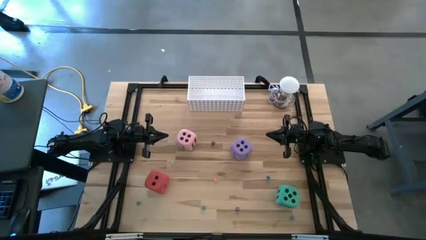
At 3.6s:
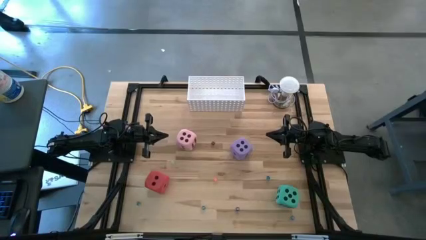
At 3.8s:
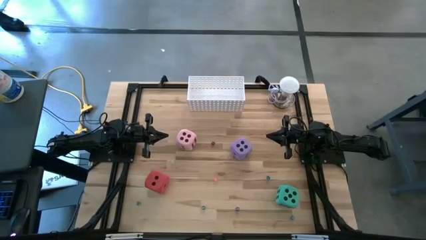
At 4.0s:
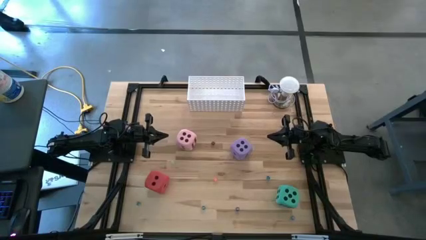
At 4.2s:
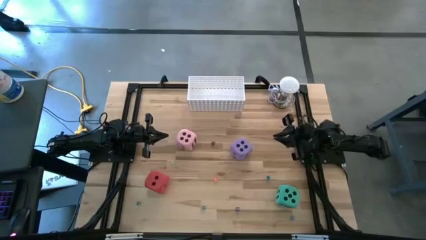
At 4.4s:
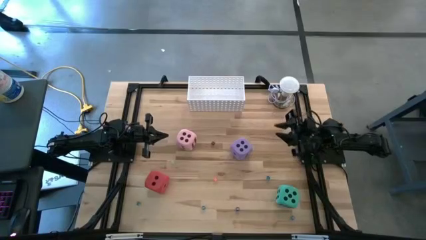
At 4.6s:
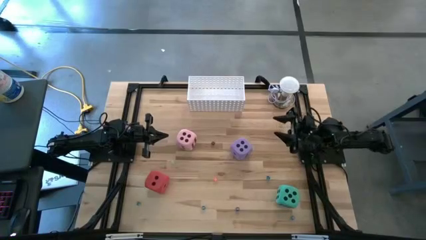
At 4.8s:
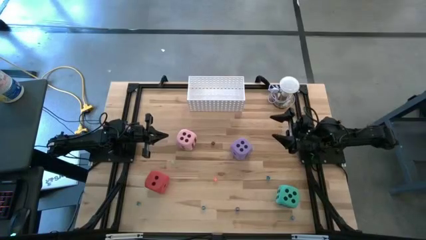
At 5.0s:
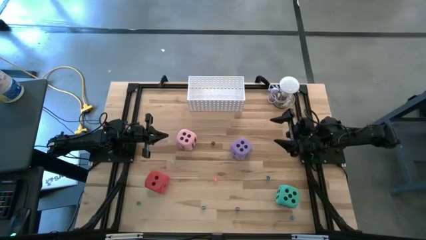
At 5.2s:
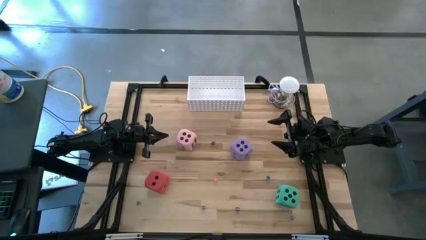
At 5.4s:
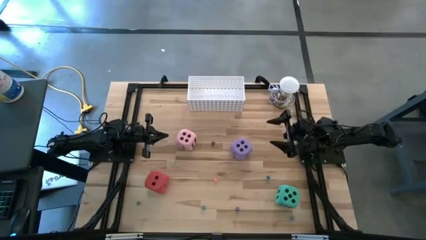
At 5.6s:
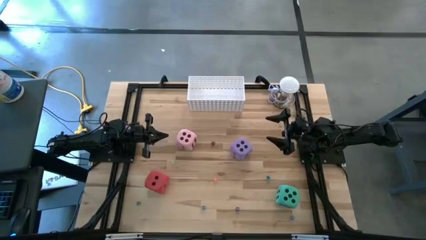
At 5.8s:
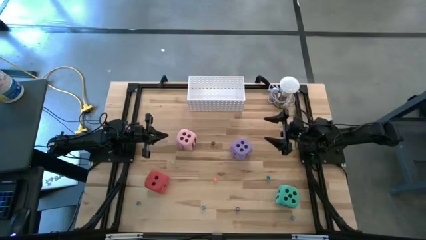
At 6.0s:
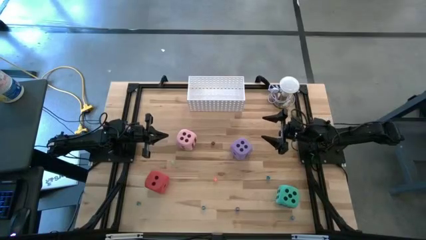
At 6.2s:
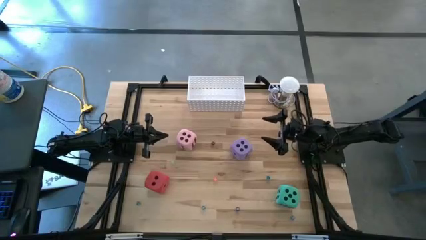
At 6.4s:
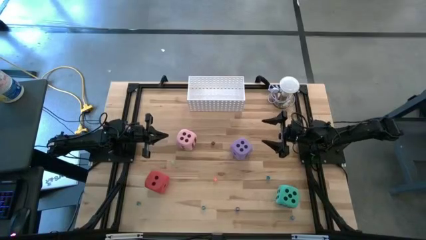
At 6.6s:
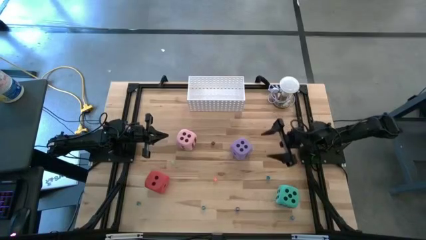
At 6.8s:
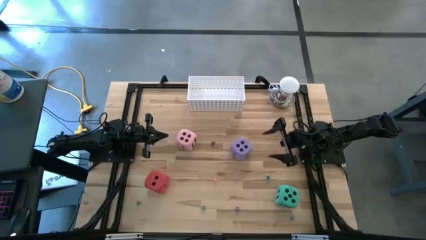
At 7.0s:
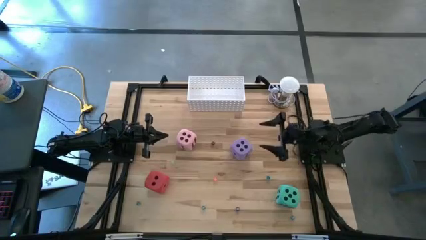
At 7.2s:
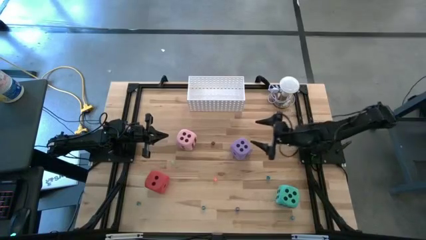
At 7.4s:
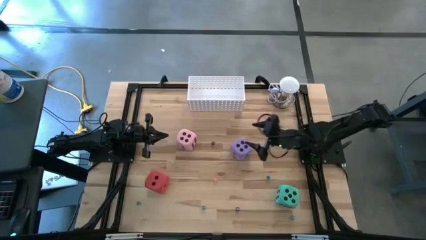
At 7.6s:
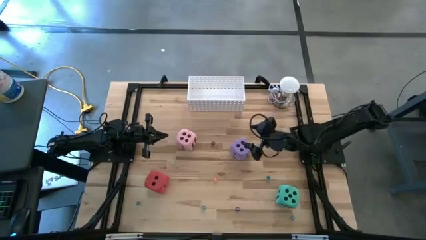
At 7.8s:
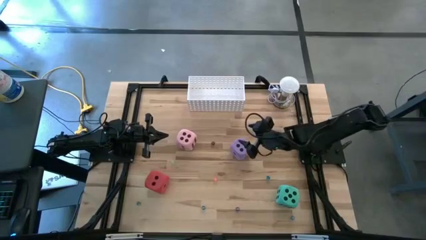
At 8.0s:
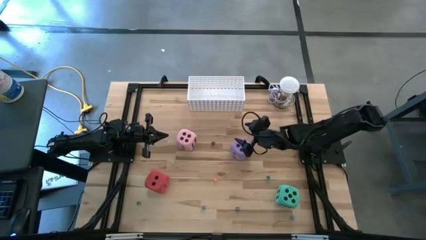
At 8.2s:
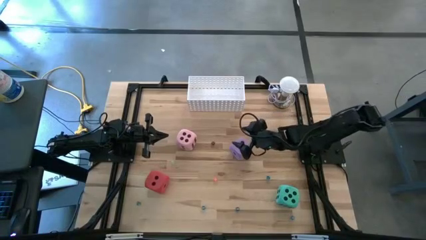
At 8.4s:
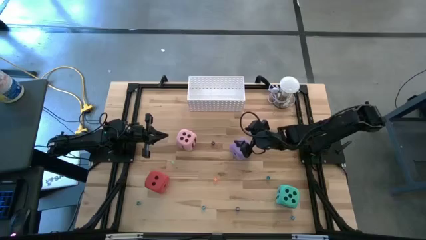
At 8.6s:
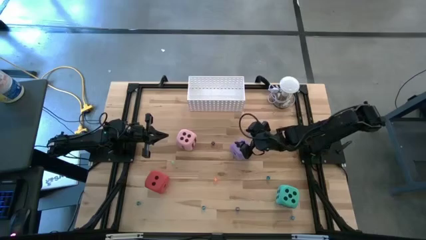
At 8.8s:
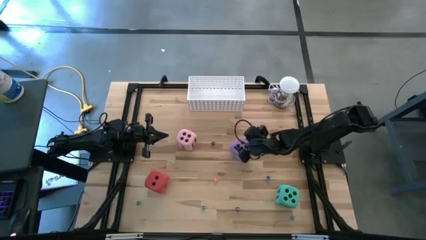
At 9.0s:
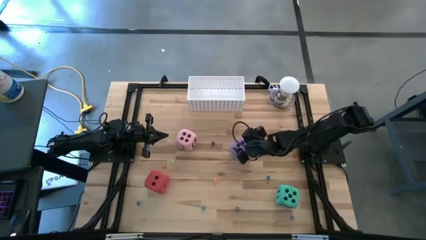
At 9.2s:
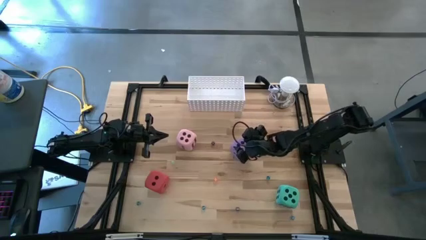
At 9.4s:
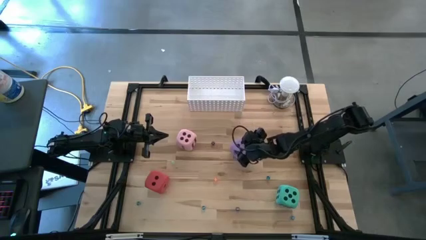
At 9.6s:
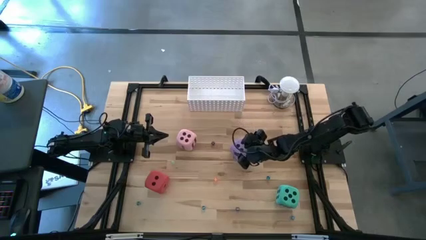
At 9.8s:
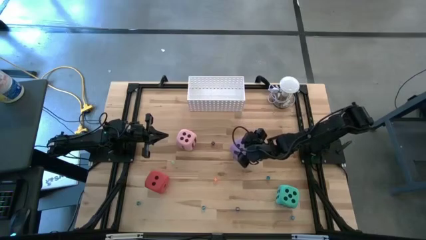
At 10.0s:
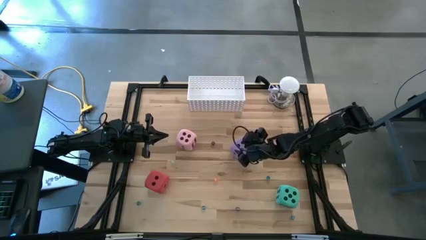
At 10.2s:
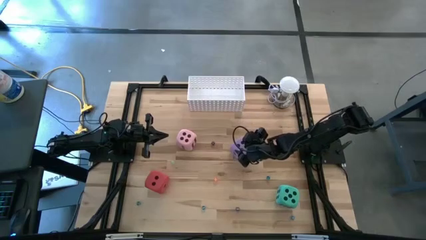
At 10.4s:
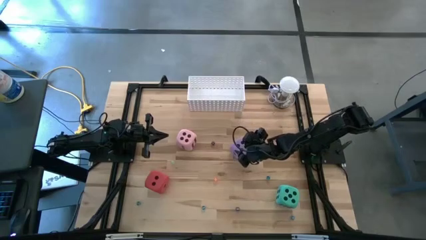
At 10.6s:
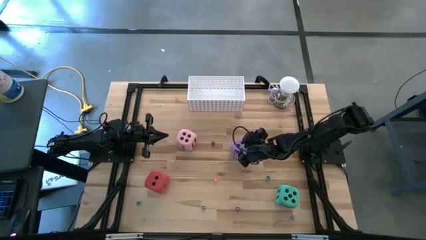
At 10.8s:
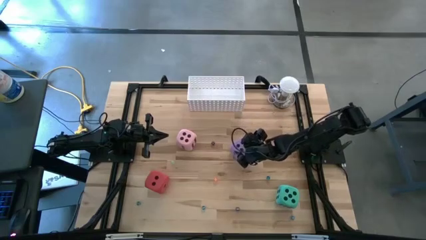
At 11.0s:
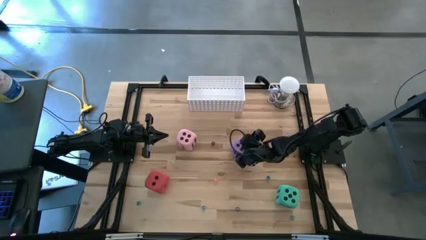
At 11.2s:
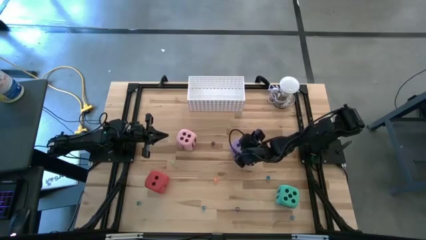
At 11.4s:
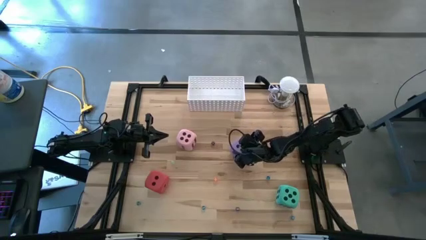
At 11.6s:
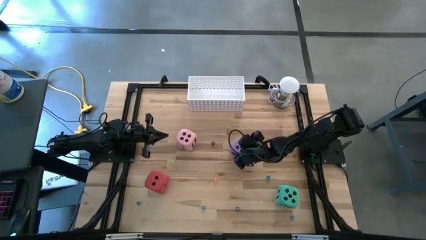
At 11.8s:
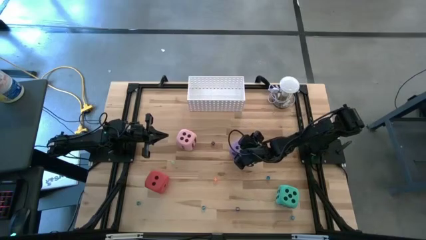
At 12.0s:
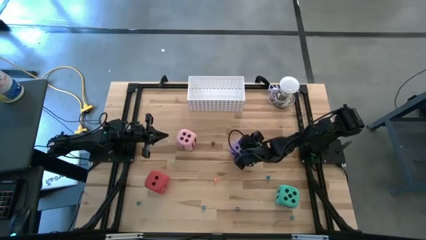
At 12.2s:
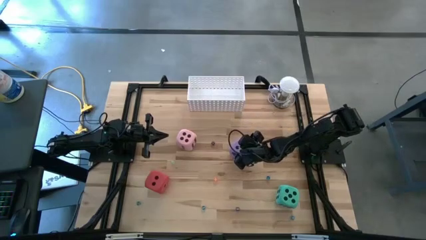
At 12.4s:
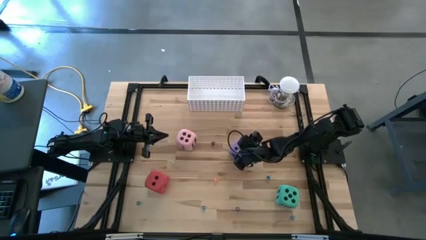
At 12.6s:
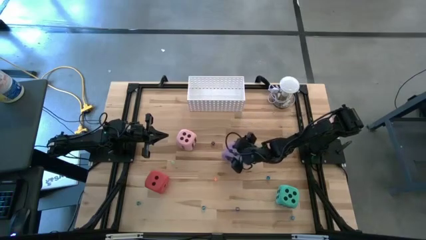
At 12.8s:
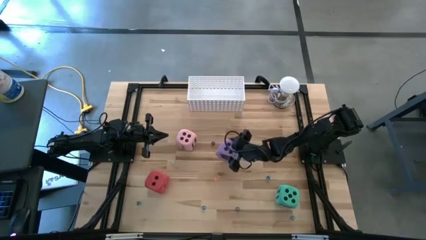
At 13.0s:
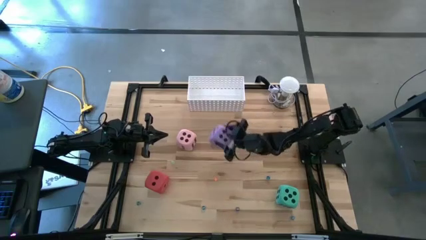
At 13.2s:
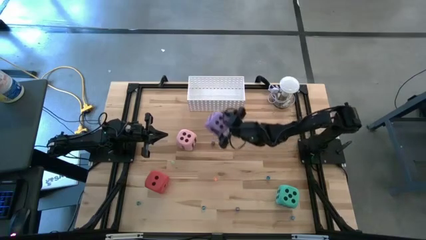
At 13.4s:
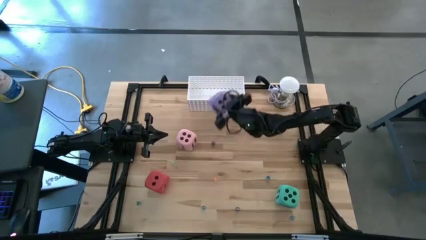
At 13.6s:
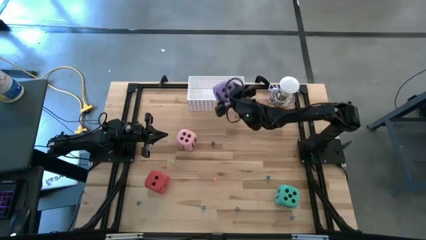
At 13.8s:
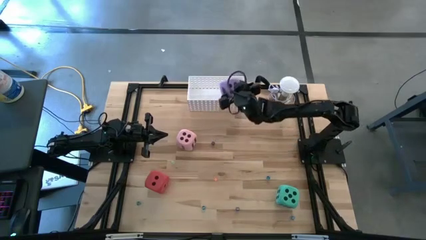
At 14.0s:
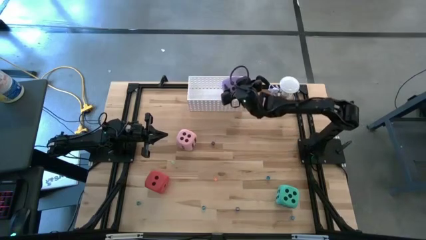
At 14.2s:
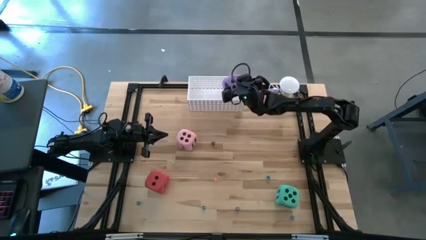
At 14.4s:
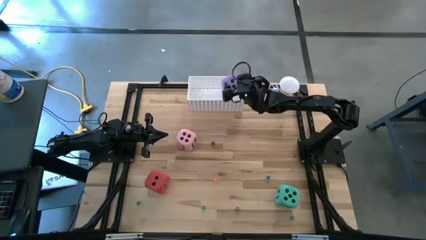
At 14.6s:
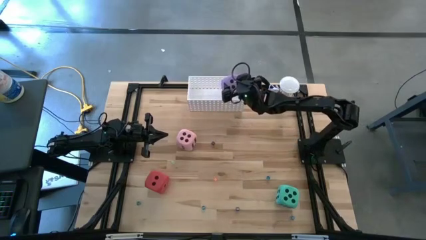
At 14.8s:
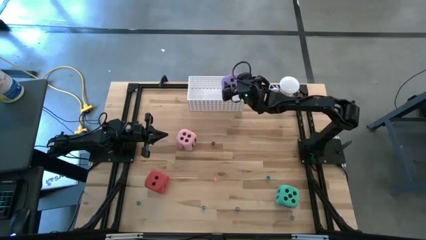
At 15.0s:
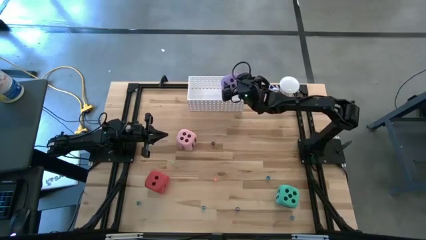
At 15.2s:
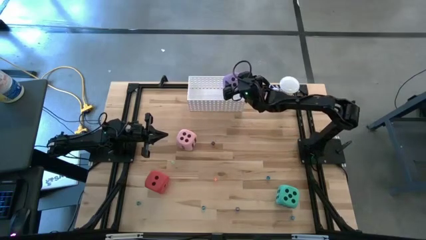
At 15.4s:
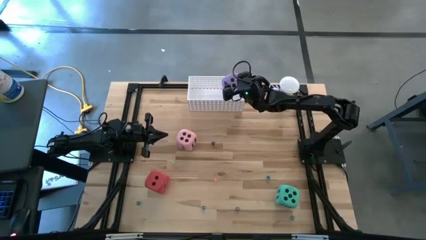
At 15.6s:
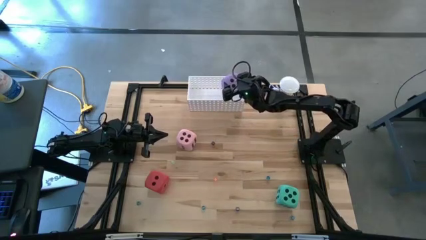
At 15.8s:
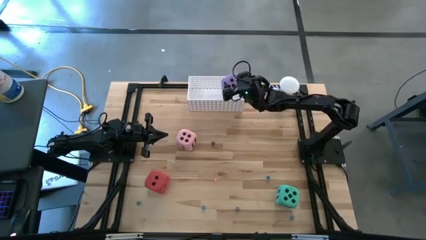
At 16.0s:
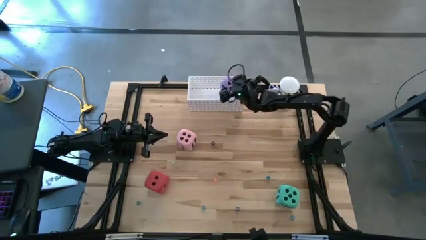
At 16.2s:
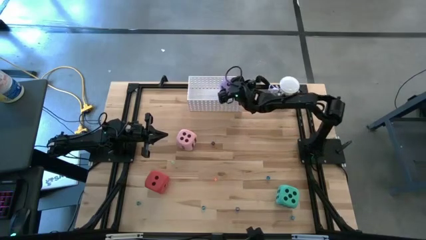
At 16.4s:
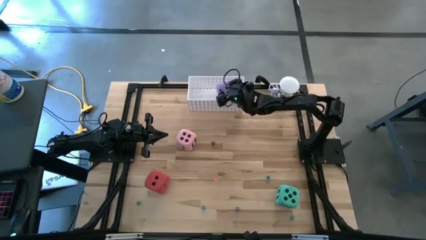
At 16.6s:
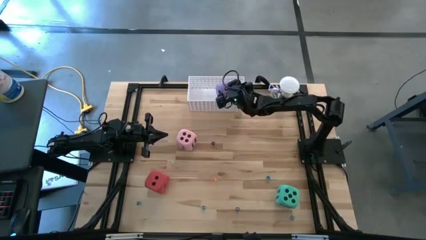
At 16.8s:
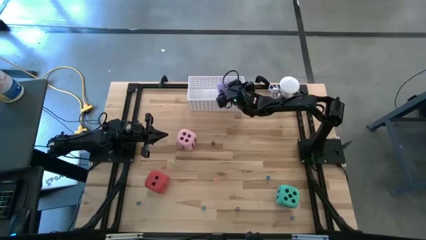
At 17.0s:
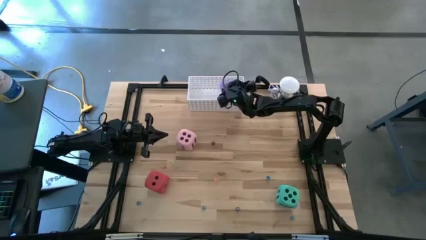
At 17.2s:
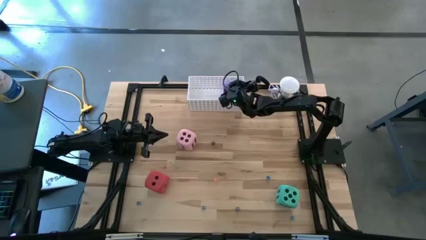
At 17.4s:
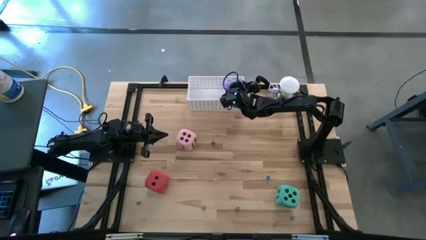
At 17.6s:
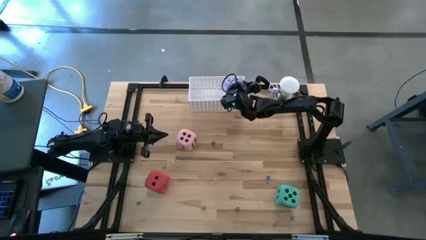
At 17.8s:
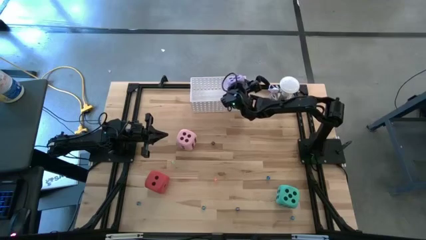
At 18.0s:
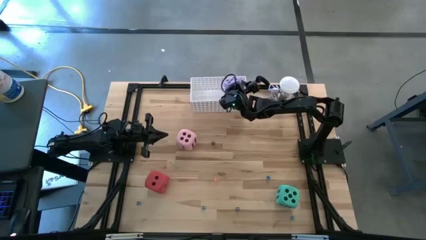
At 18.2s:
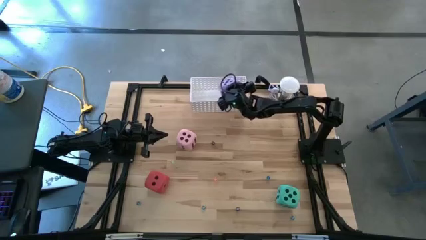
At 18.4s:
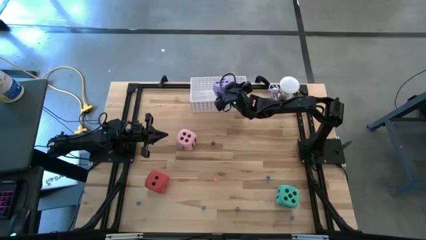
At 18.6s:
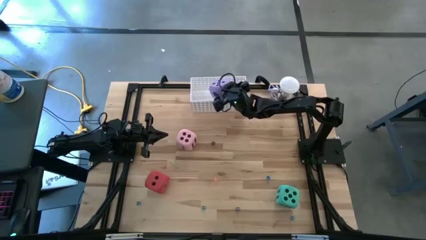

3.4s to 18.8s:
Task: Pick & Place Dice
Put the large purple dice into the white bin
